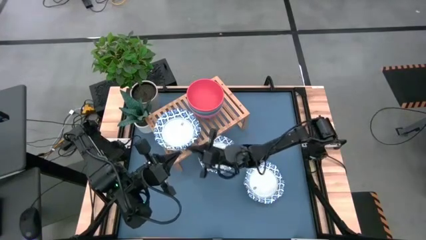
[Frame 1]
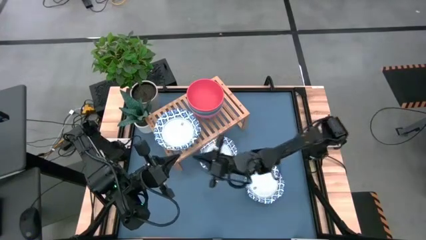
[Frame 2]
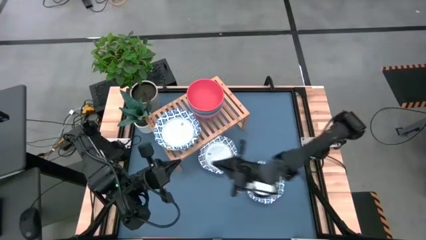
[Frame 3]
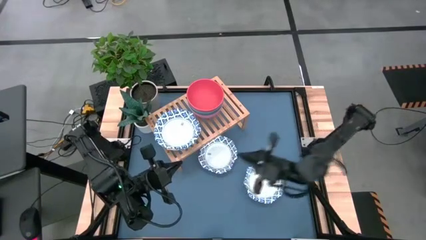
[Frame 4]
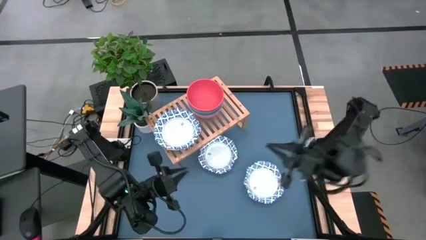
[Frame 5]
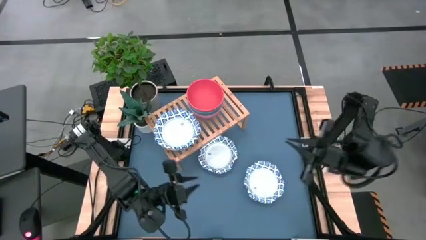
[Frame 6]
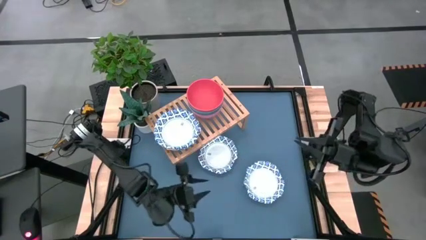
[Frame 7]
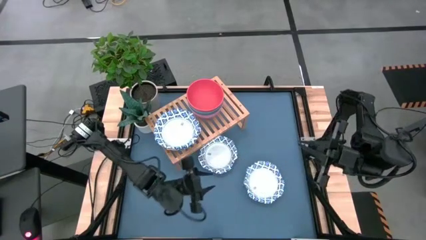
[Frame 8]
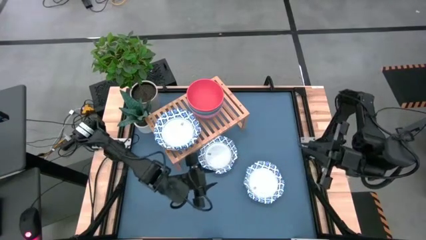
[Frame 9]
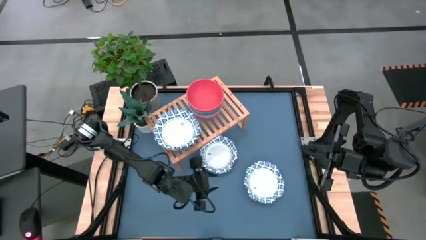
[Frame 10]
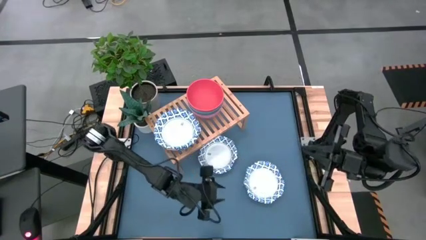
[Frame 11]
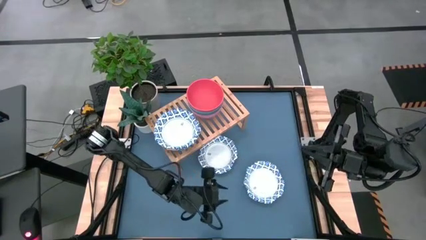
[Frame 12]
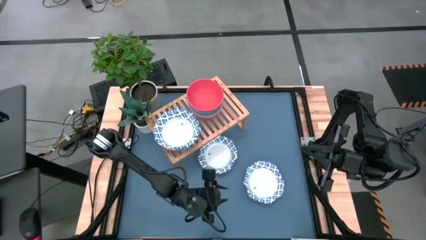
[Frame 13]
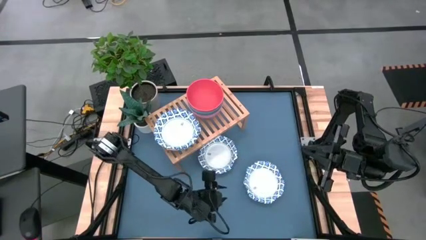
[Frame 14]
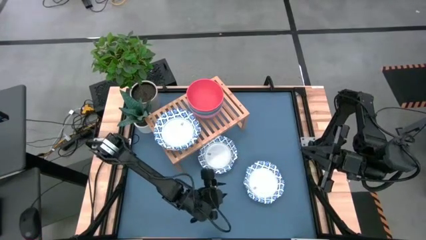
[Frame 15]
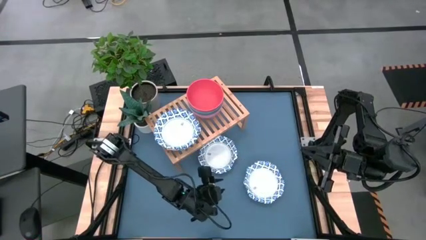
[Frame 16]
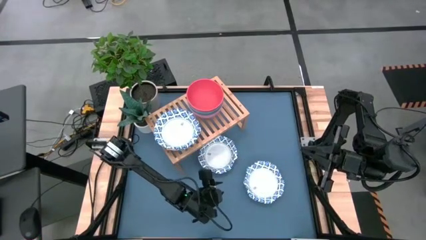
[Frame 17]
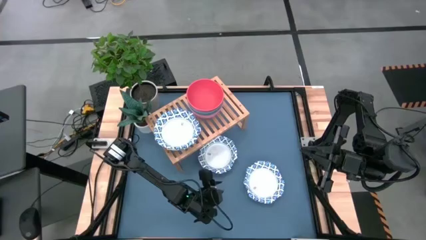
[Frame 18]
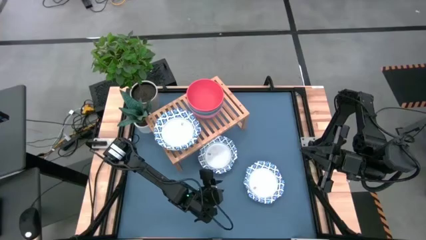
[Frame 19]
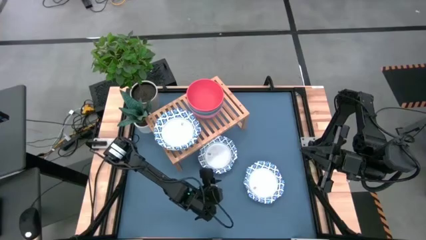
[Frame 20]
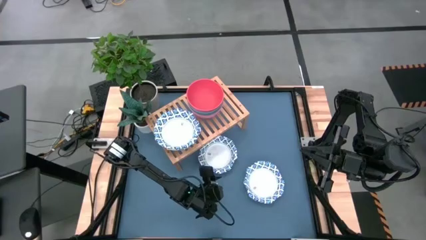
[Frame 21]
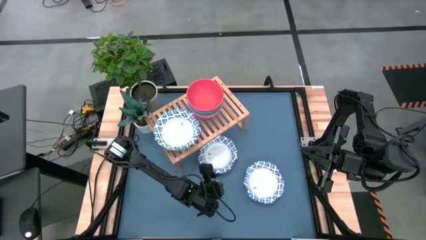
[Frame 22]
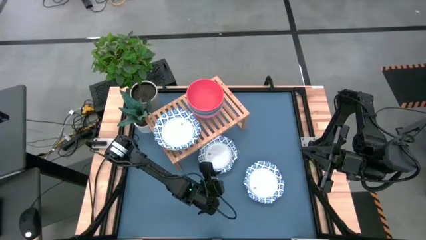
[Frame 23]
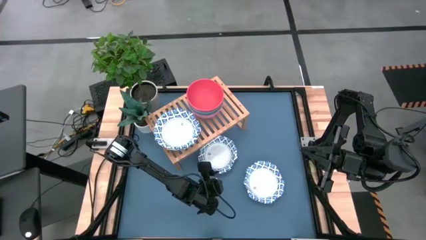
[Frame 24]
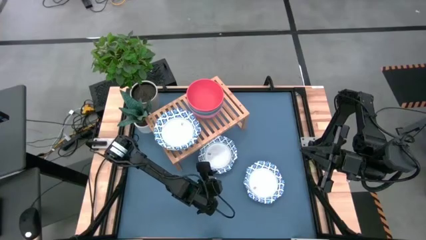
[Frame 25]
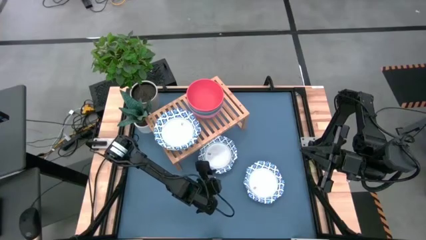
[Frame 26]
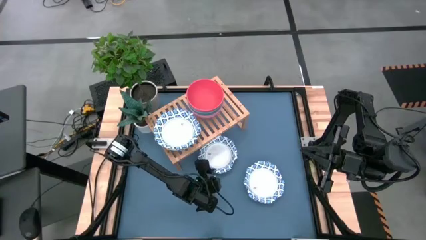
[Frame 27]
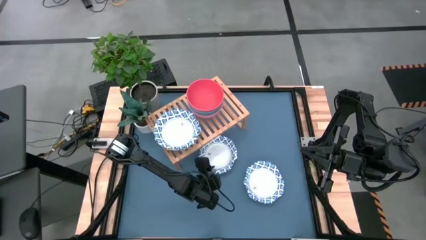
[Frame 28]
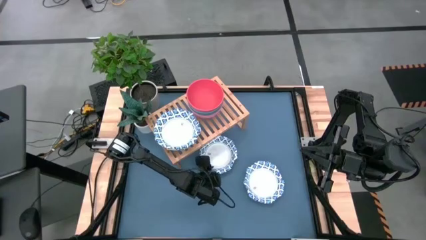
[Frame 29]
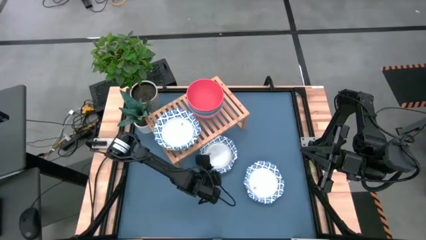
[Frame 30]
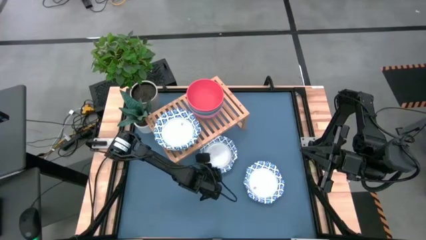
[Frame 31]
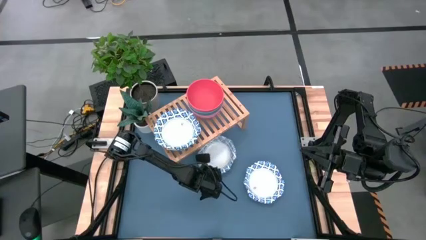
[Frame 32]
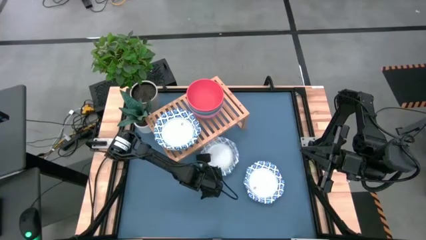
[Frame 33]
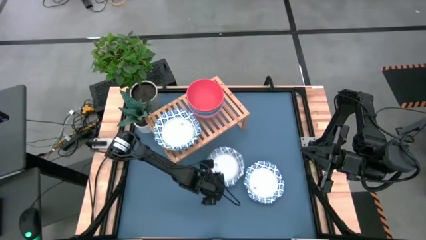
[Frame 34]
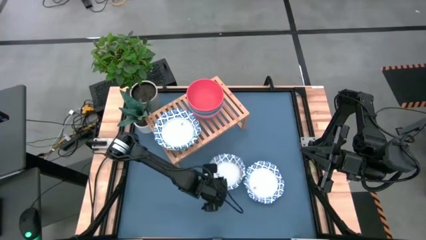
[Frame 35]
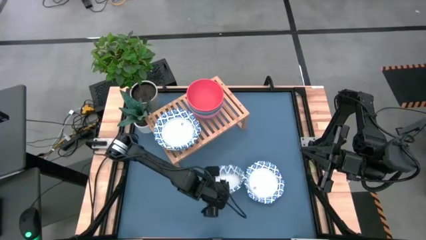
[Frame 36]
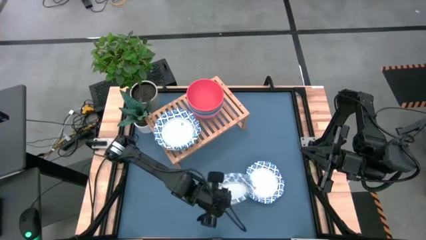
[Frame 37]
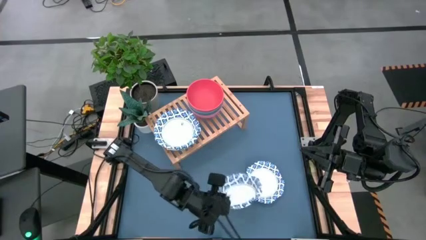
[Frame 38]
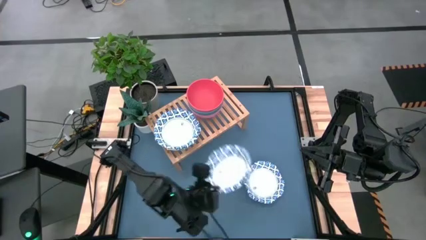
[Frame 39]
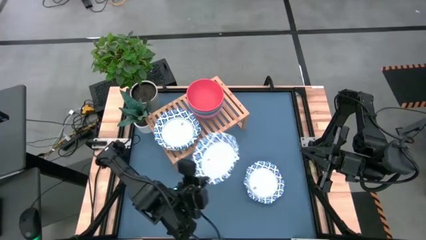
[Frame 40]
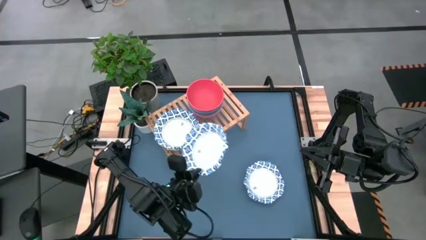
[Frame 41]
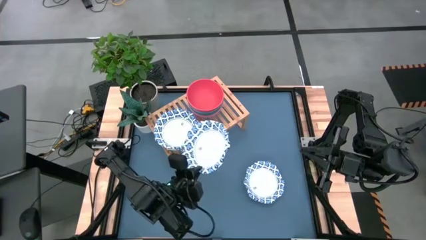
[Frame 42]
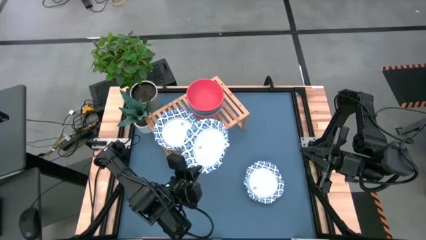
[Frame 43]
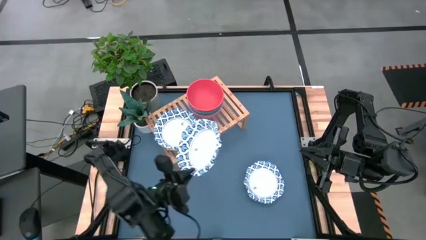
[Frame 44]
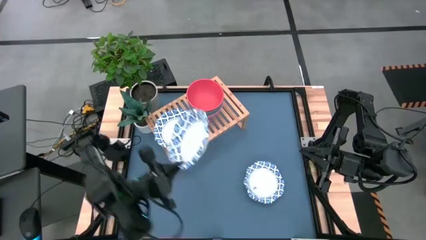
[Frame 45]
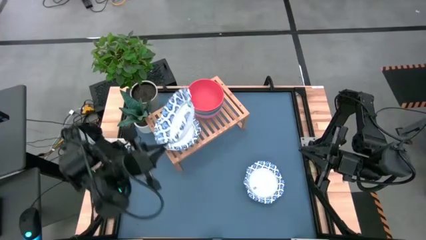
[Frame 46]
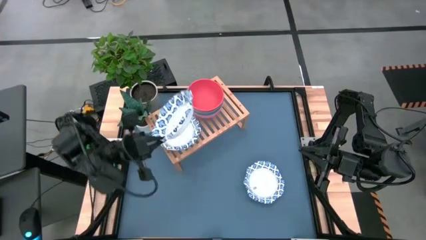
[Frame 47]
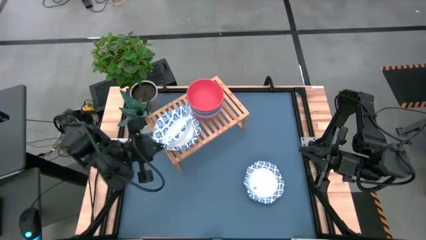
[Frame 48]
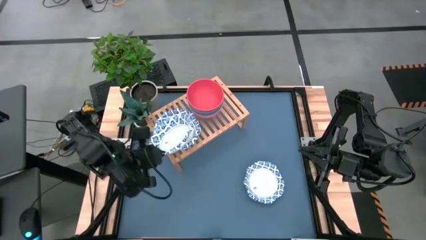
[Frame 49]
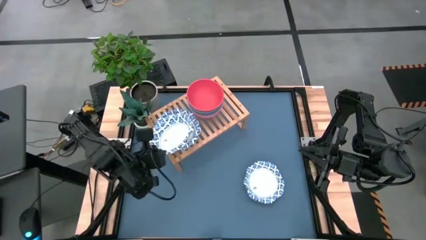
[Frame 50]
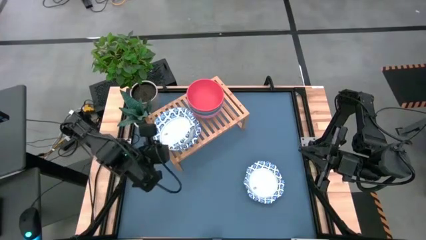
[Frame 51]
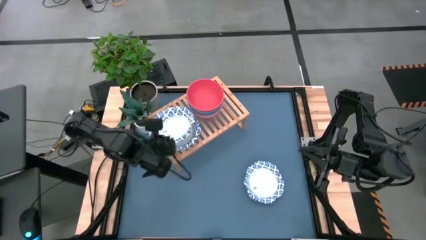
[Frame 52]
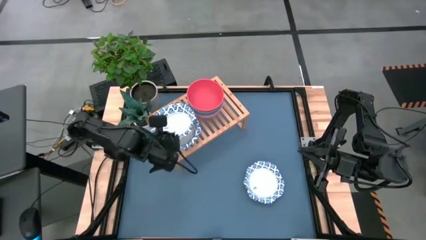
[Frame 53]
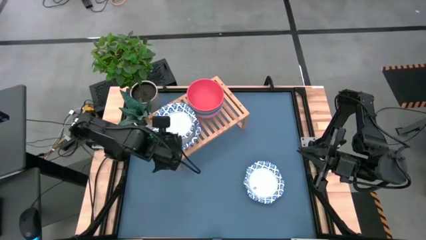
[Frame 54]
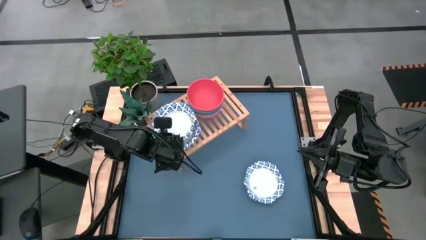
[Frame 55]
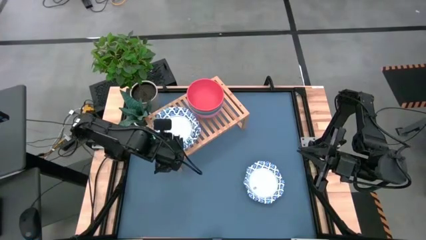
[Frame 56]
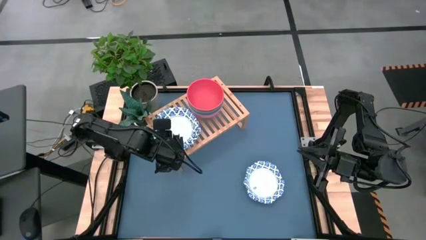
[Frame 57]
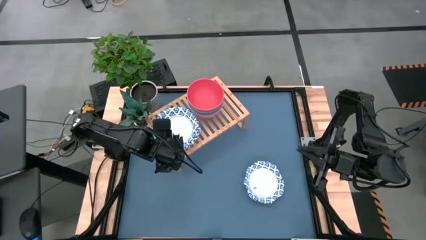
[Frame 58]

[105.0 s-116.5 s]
Task: Place and stack bowls onto a shelf
Stack the white patterned bowl on top of the other white patterned bowls on the shelf

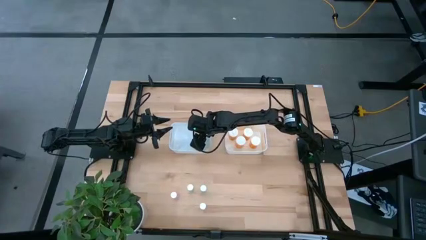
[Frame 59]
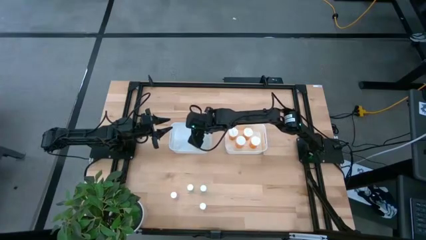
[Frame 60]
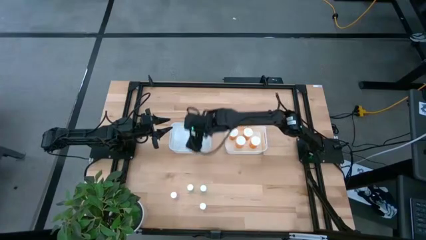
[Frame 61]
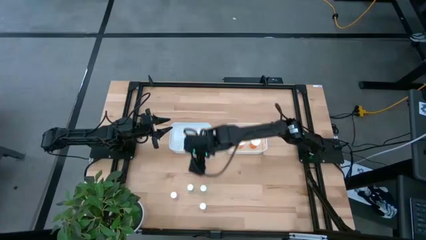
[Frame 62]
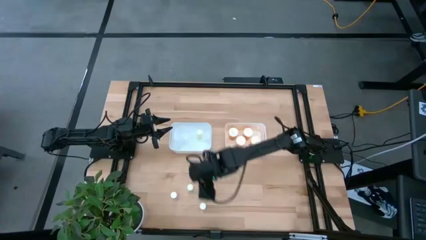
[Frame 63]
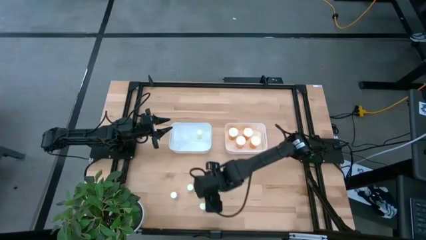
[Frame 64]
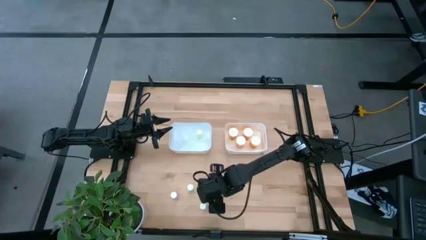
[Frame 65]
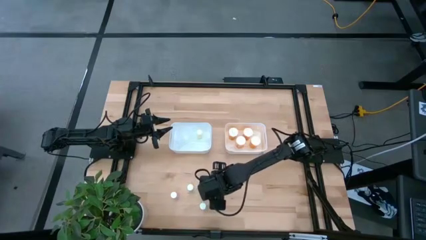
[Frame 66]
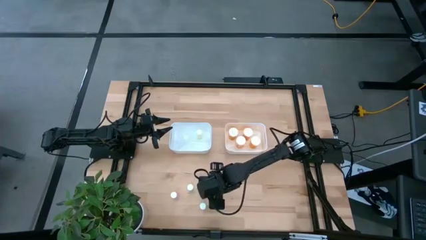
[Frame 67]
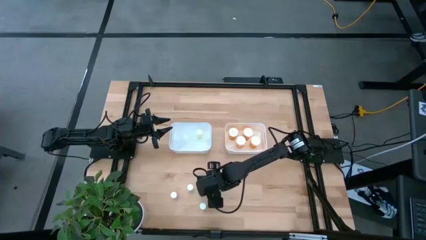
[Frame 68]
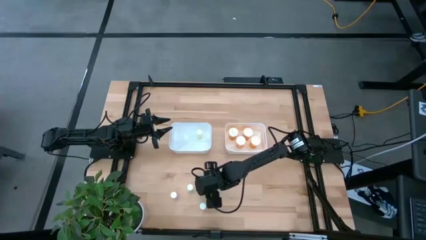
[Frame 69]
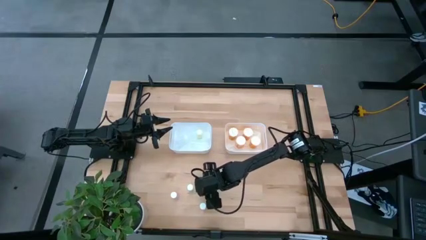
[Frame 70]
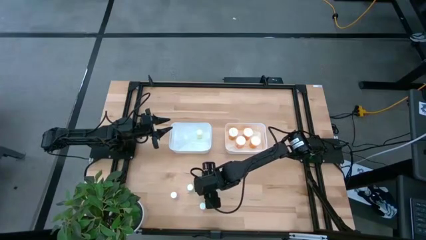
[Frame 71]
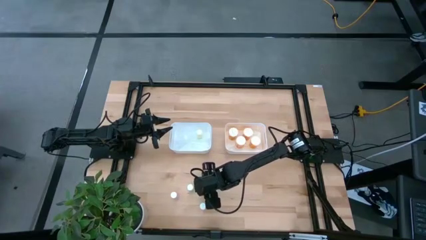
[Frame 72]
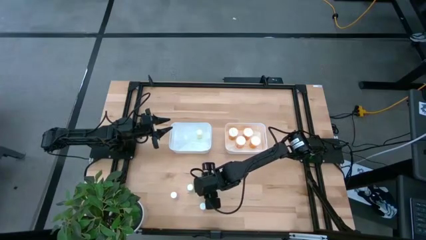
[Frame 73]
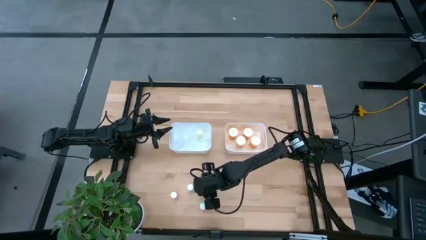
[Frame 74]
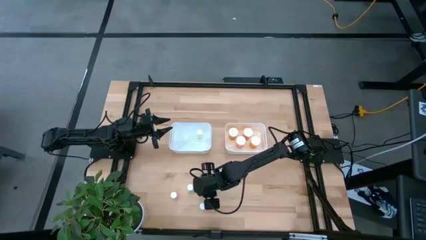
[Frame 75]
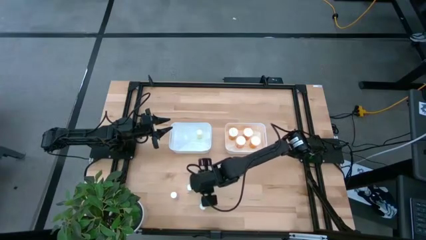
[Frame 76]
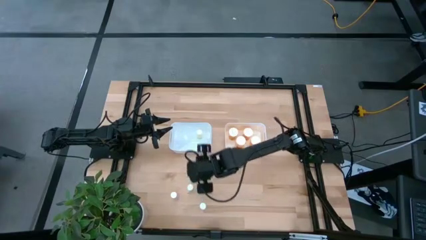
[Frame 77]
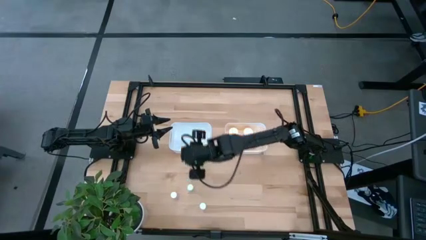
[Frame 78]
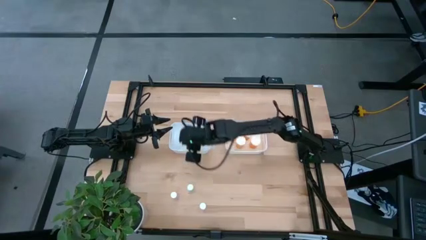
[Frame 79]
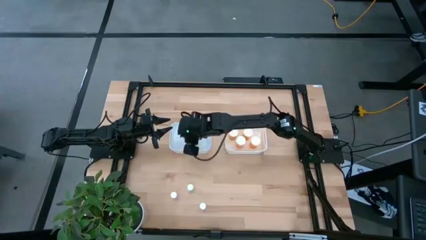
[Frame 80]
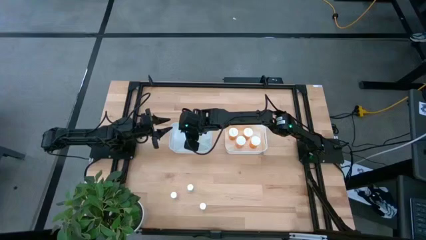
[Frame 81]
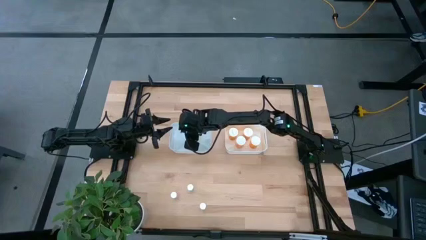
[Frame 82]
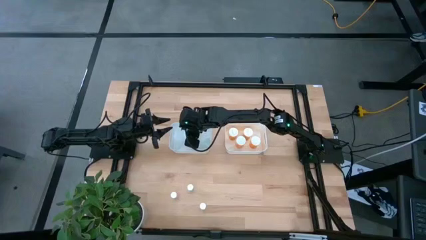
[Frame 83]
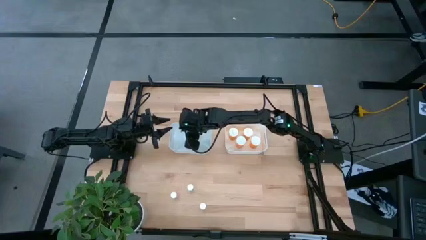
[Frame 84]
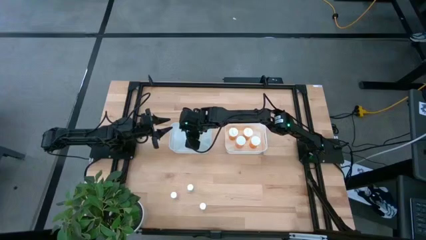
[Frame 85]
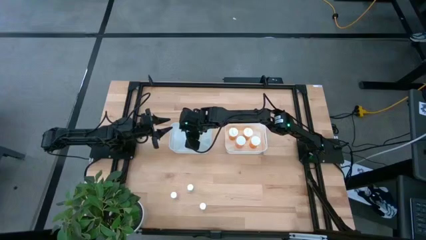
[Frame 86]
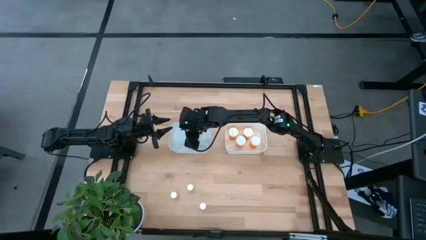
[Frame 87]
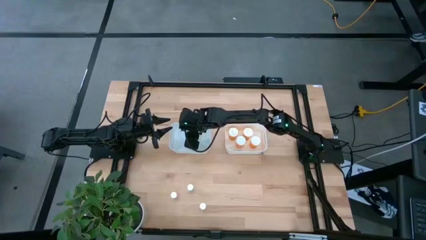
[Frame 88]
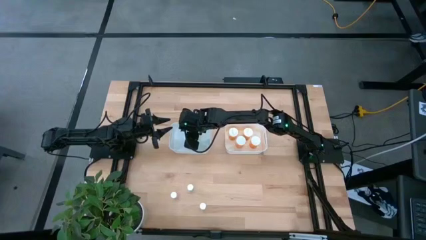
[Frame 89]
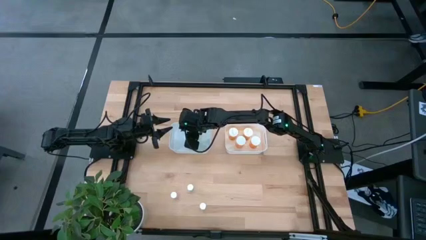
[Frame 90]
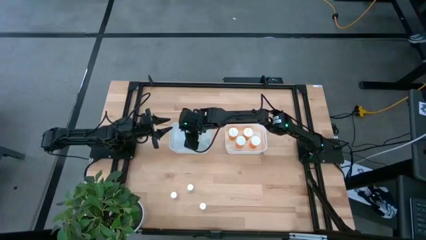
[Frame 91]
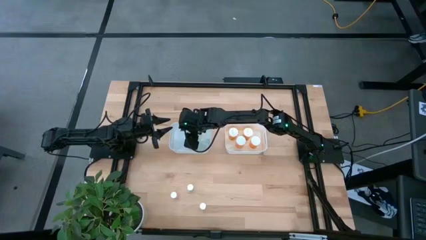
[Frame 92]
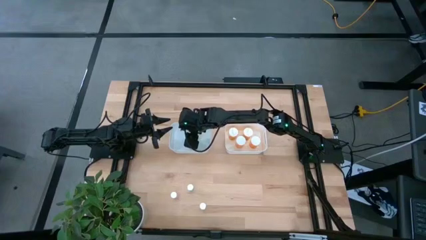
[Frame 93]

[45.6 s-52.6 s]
Task: Pick and place medicine bottles into bin by pill shape (circle, oval)
Put the small blue pill bottle into the left white bin
